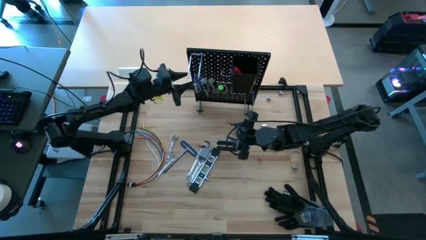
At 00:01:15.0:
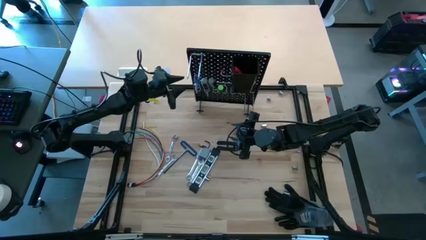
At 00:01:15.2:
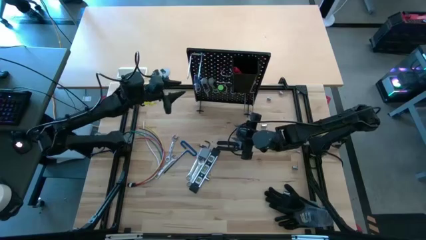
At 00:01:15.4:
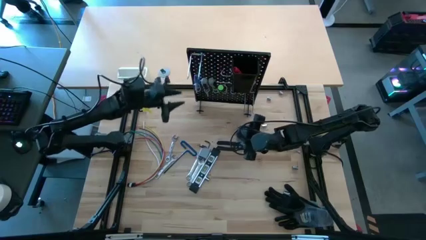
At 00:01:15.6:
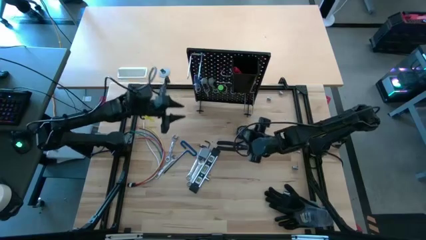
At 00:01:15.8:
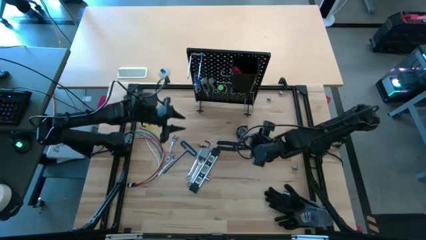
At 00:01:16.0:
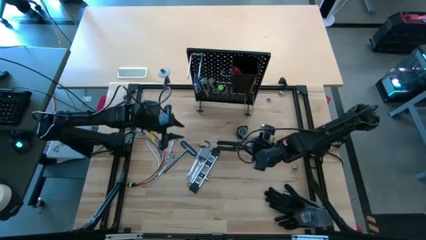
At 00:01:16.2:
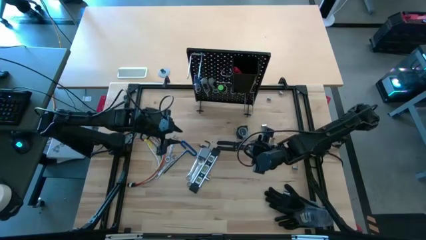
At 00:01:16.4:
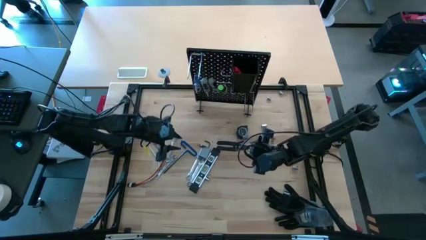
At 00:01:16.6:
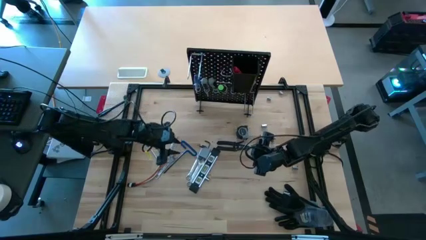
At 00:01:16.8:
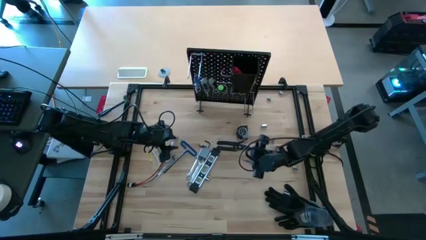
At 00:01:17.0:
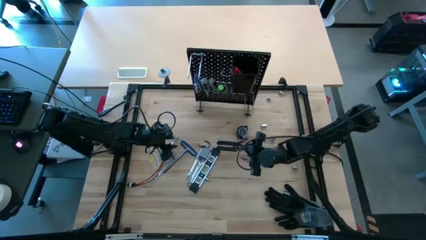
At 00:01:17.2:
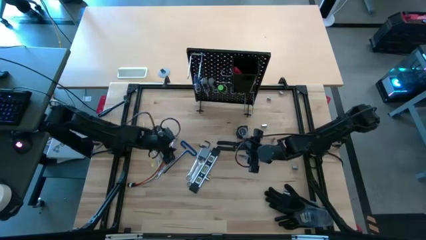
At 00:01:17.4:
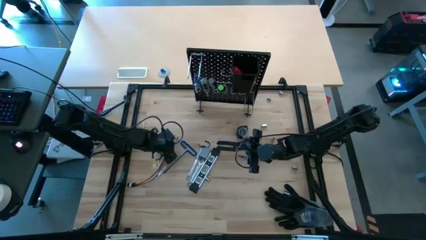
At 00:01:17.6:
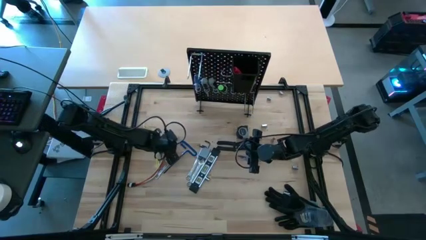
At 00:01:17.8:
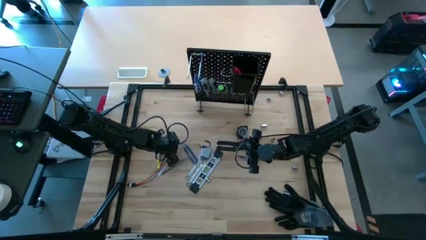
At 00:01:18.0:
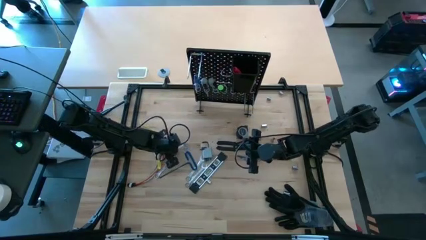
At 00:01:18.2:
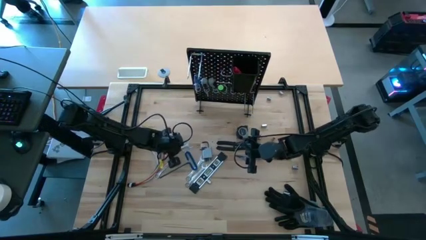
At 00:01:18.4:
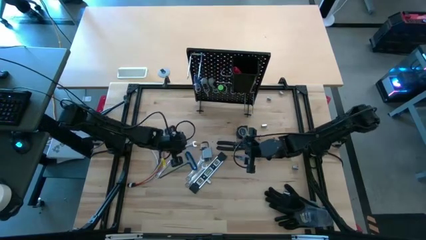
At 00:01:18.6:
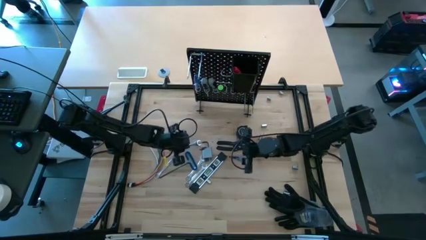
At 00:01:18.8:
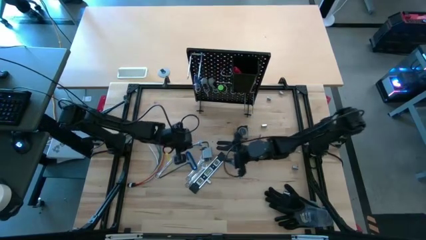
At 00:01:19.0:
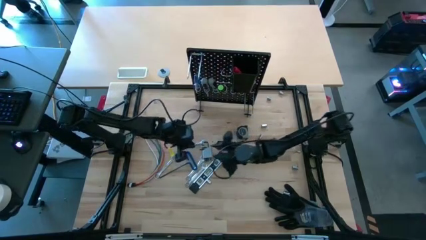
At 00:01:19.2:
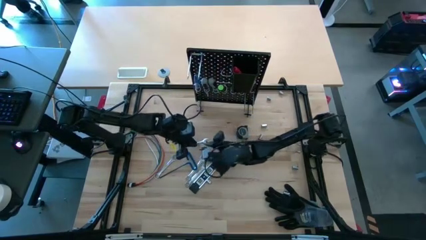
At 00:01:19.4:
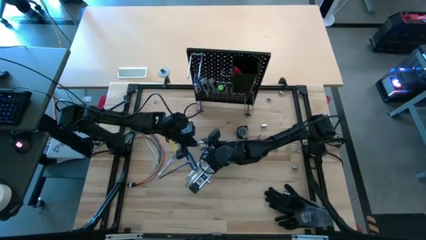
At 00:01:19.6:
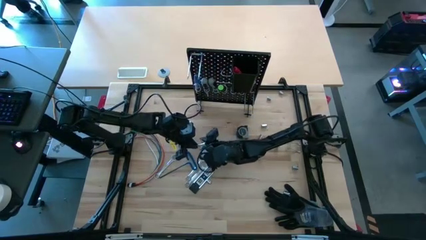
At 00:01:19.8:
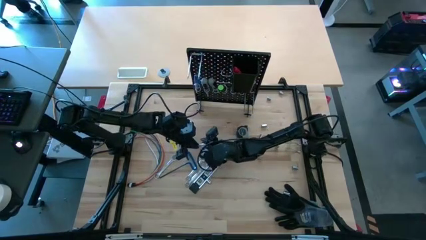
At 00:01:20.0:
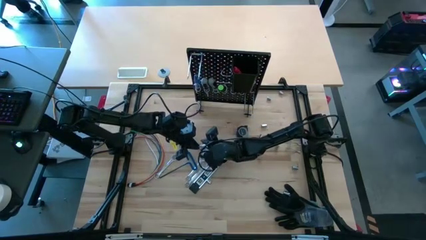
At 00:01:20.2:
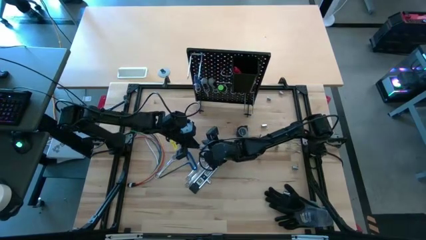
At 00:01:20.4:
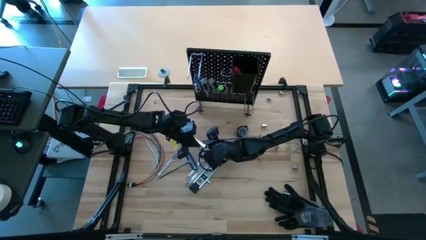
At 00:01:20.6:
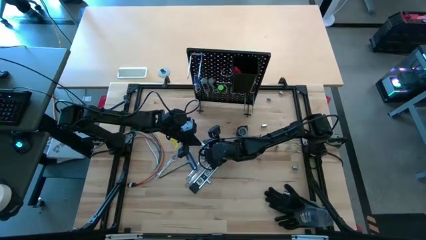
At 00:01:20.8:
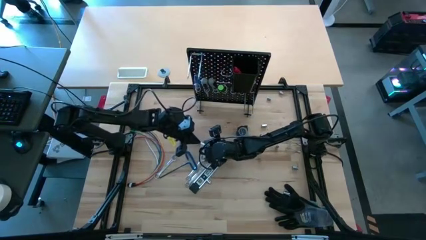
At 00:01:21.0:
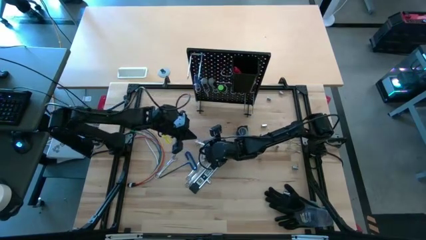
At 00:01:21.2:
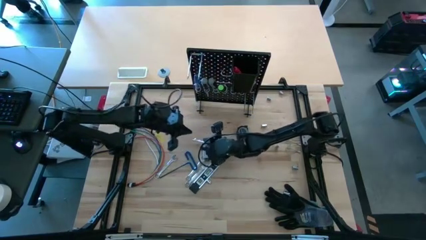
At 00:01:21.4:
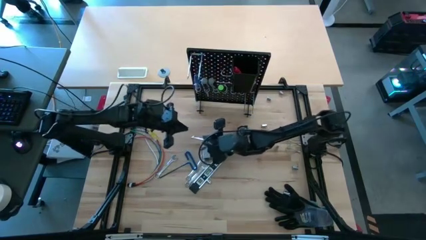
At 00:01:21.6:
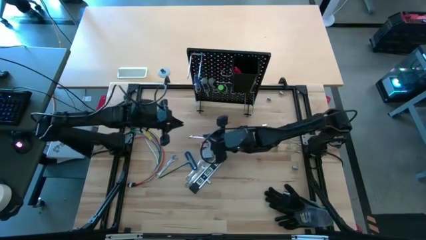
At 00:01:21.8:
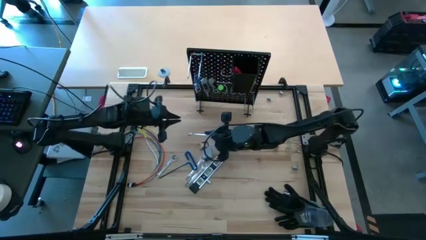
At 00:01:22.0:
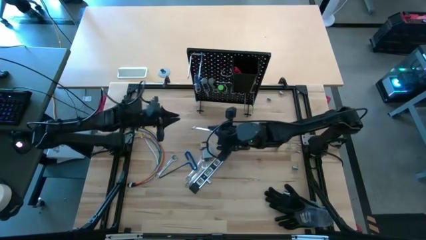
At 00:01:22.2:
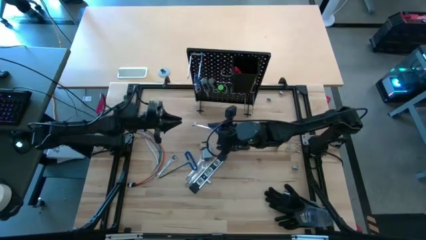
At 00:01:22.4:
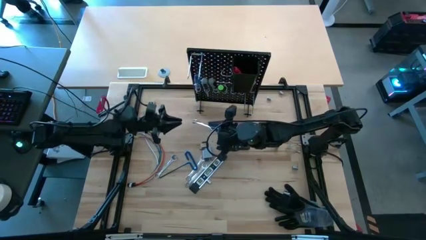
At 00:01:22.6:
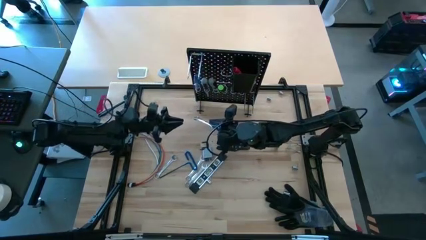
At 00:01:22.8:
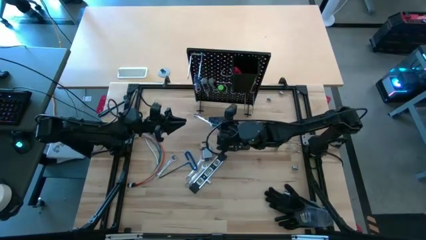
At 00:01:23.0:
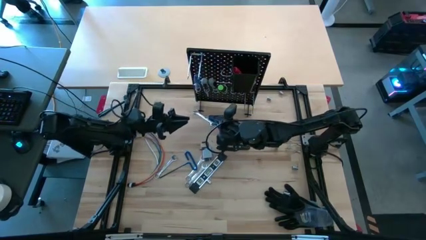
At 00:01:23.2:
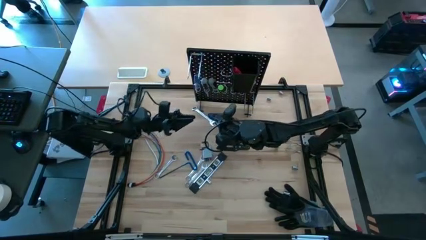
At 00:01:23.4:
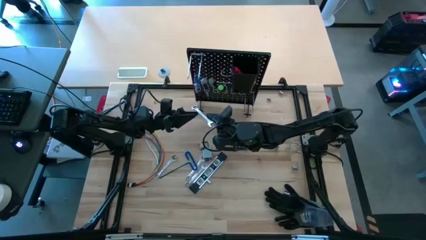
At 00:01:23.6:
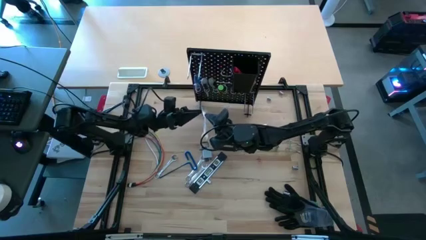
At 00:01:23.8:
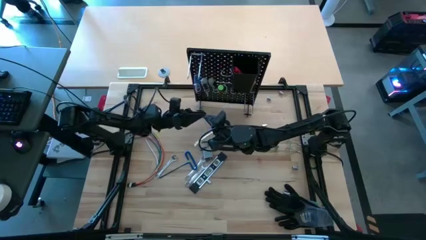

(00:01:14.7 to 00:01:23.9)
Task: Hang tools onto peg board
Hang the wrench on the peg board

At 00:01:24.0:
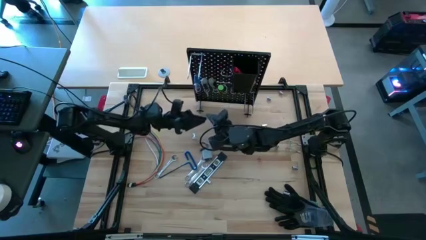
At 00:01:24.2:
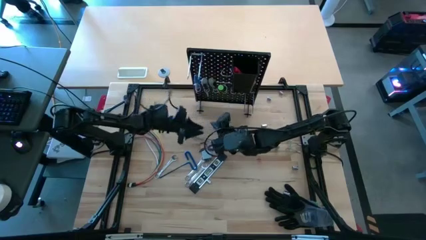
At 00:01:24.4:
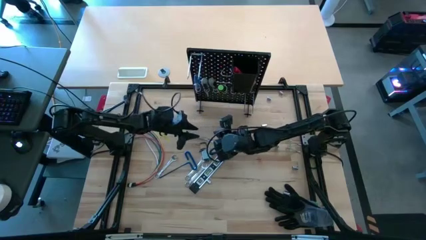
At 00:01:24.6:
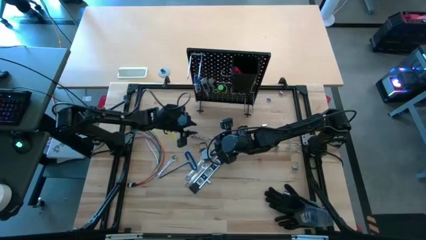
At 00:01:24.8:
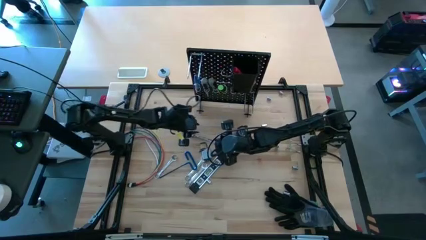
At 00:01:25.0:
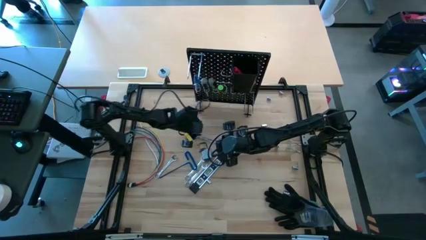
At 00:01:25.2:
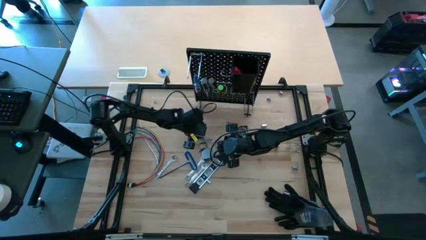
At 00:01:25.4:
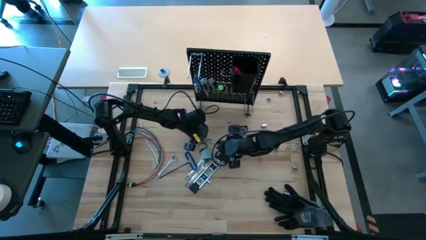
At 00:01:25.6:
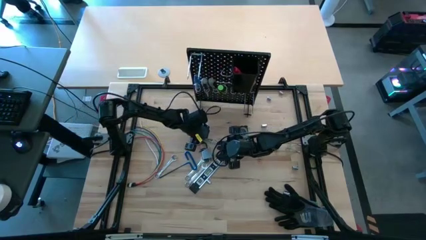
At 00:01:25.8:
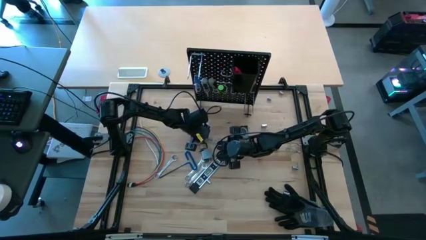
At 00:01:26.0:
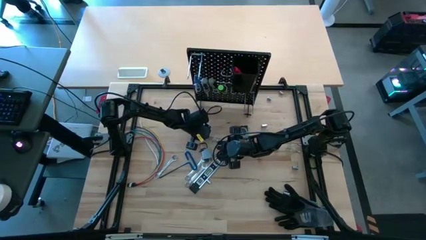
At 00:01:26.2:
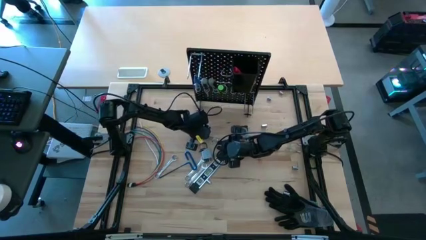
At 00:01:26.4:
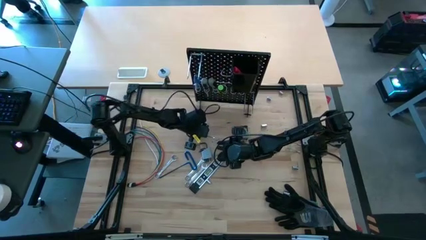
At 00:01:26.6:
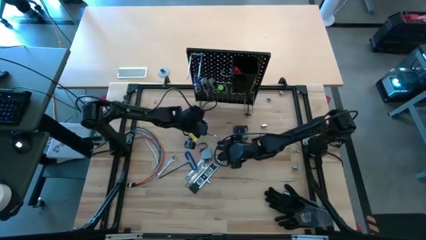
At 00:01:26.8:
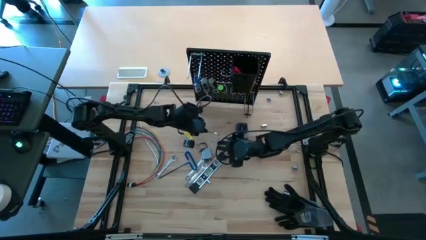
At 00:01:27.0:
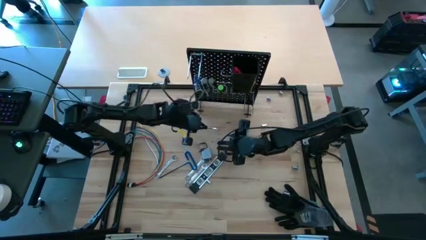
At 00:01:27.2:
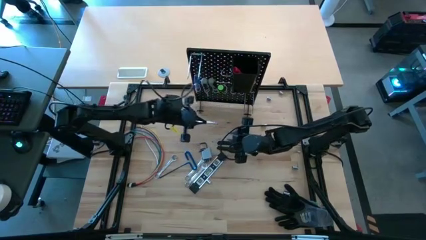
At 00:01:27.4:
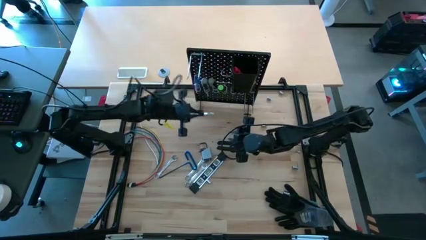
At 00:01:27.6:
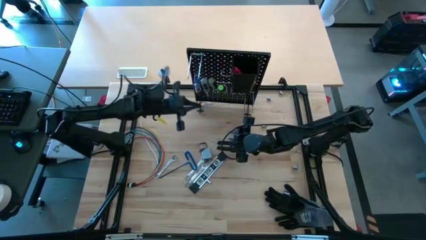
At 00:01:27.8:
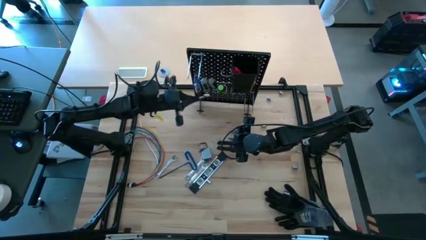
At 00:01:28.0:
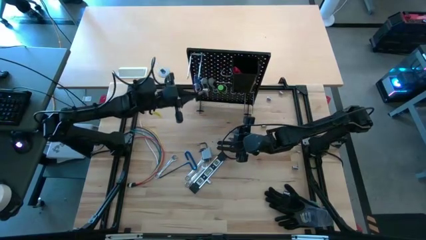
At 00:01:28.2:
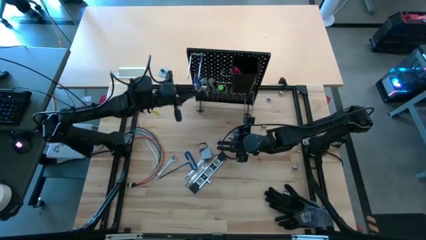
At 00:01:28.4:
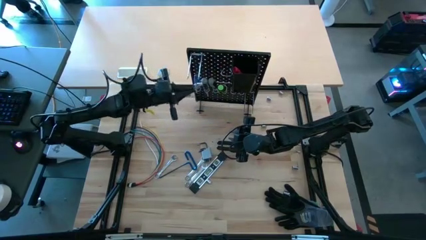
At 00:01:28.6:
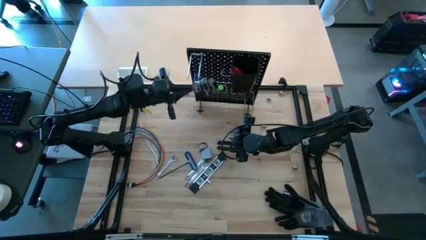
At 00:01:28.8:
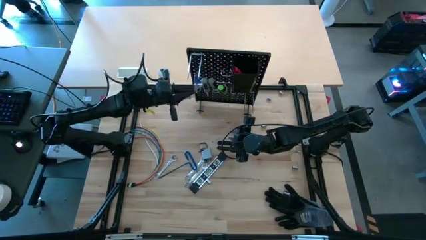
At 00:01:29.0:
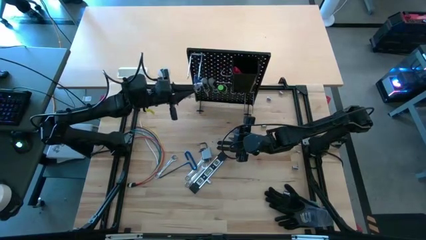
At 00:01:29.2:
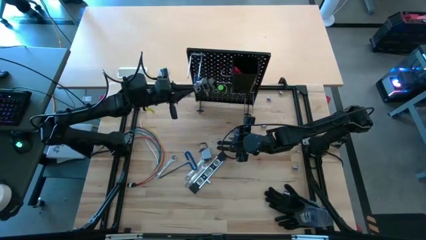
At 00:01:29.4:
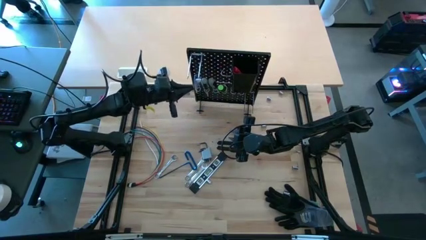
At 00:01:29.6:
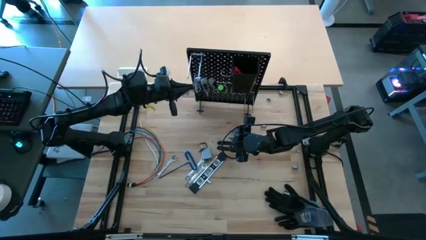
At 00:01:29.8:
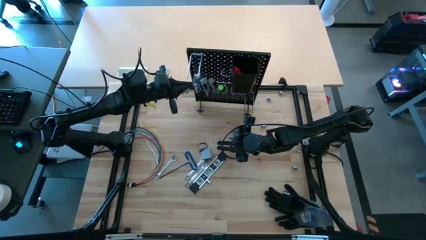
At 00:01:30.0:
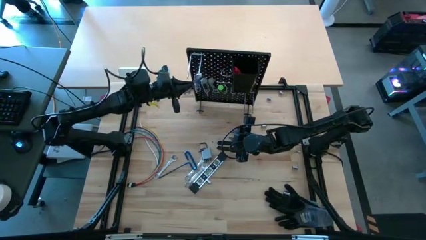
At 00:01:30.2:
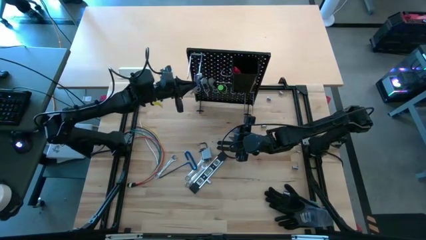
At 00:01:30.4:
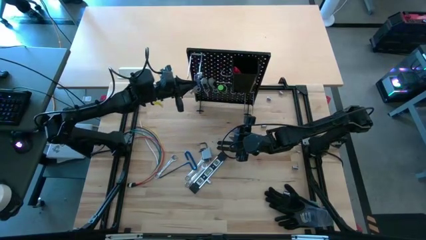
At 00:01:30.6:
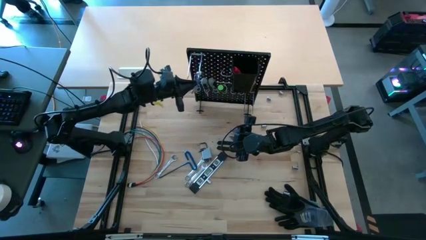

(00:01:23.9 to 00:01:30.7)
Hang the wrench on the peg board
